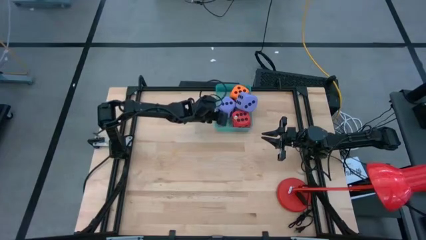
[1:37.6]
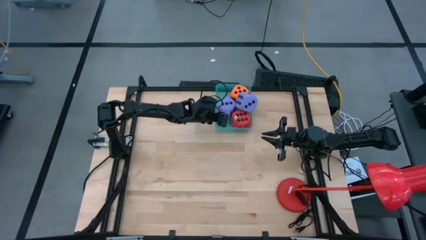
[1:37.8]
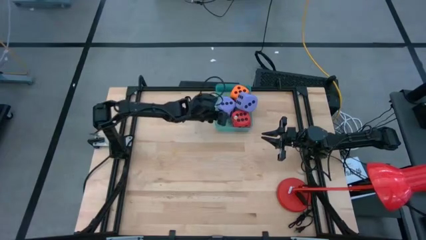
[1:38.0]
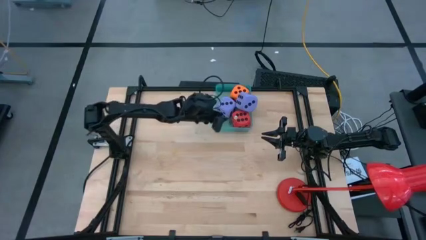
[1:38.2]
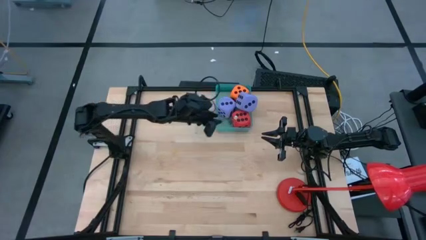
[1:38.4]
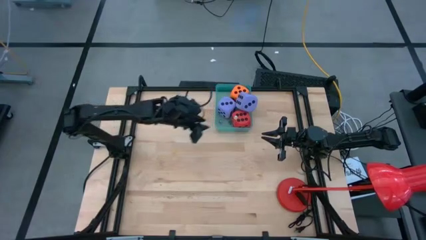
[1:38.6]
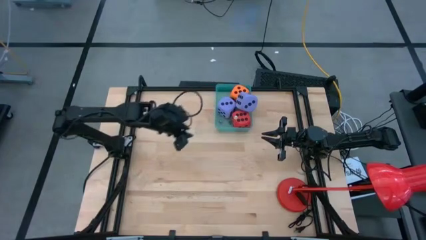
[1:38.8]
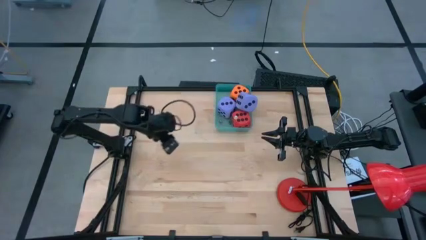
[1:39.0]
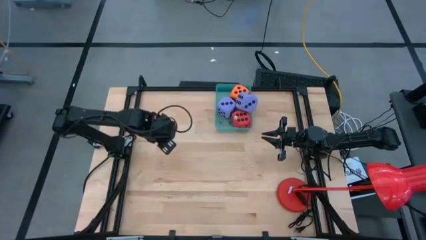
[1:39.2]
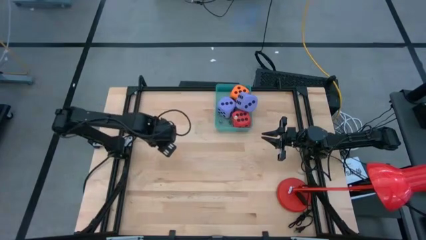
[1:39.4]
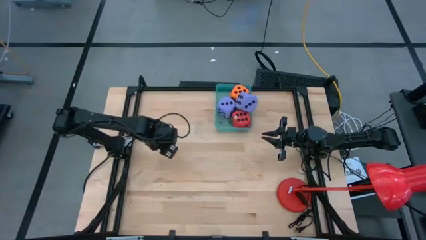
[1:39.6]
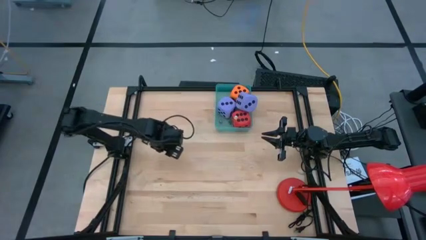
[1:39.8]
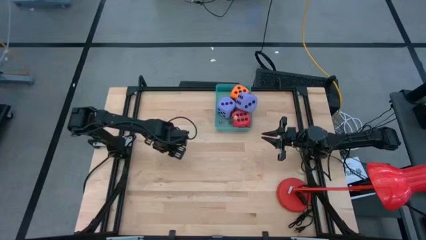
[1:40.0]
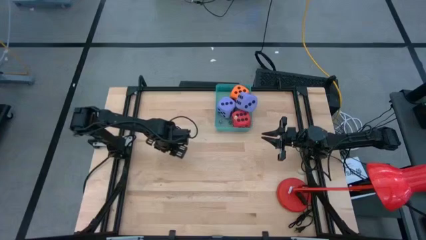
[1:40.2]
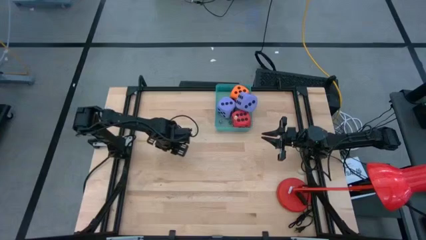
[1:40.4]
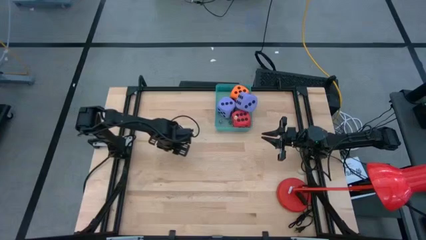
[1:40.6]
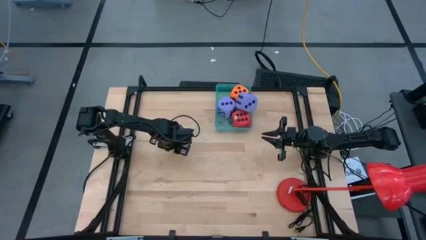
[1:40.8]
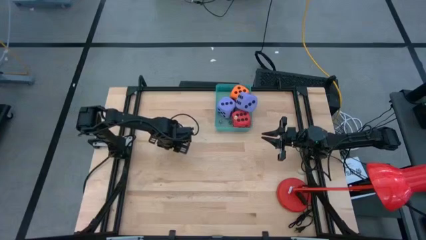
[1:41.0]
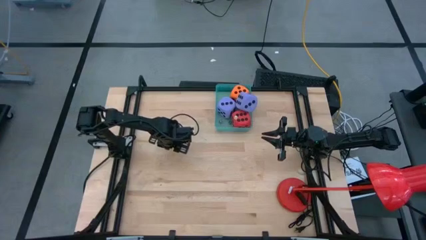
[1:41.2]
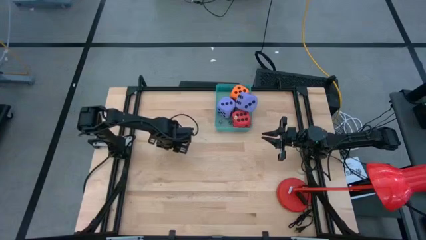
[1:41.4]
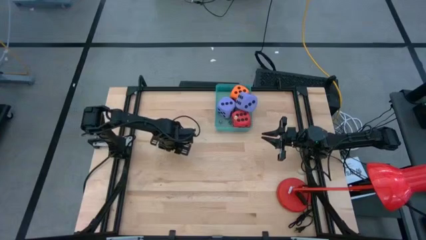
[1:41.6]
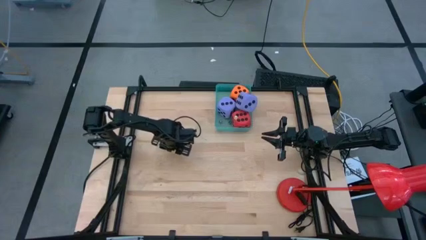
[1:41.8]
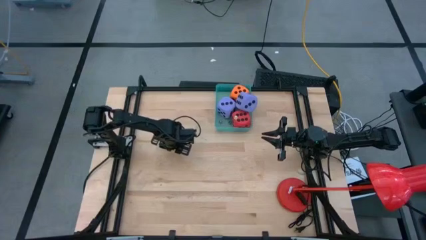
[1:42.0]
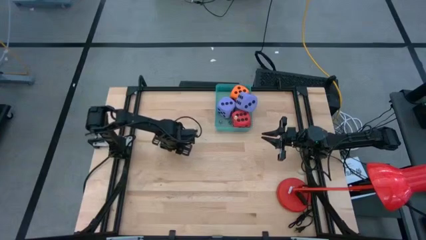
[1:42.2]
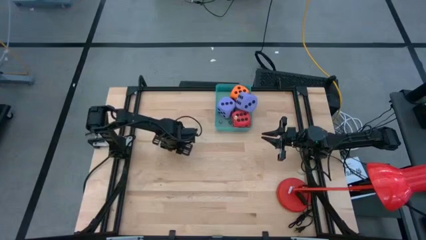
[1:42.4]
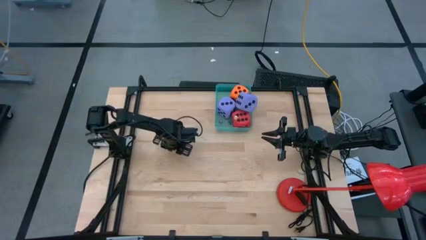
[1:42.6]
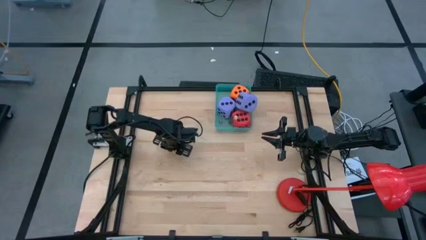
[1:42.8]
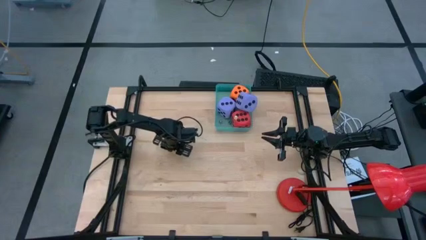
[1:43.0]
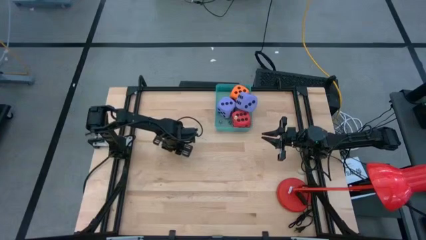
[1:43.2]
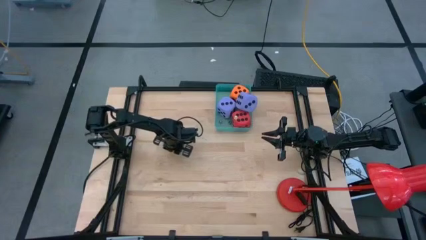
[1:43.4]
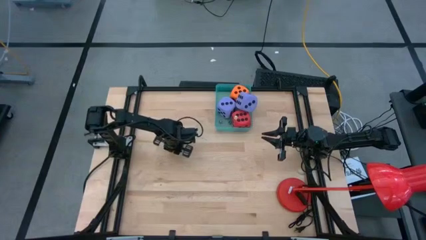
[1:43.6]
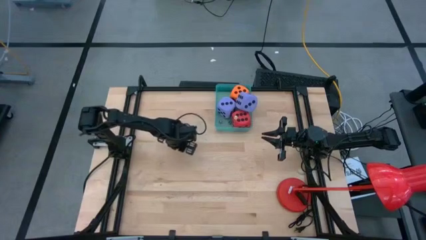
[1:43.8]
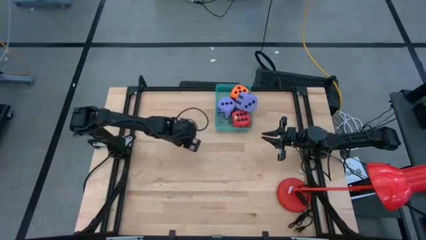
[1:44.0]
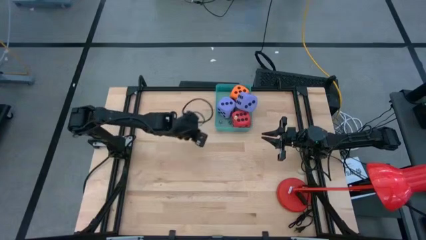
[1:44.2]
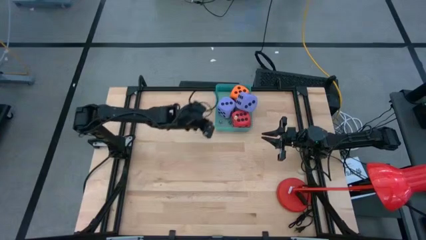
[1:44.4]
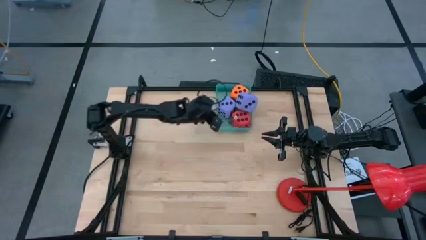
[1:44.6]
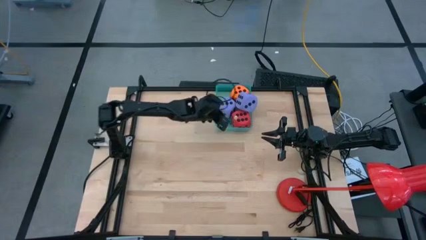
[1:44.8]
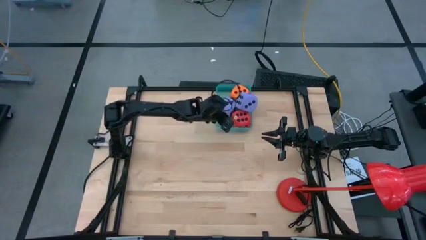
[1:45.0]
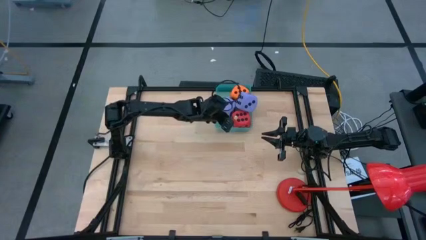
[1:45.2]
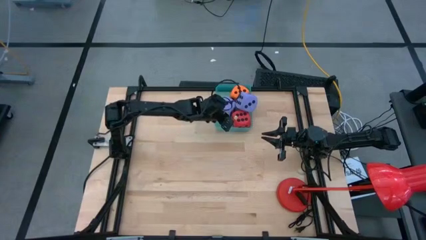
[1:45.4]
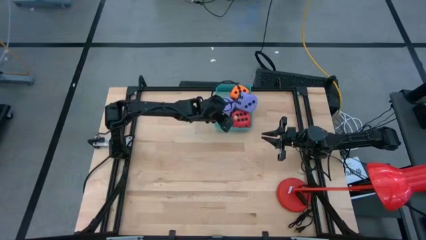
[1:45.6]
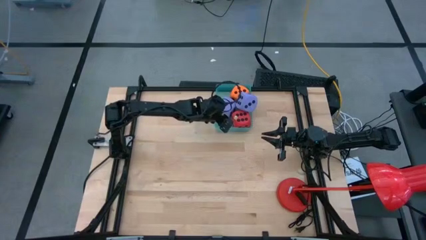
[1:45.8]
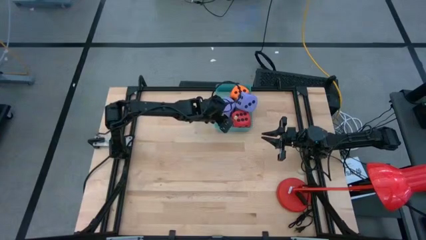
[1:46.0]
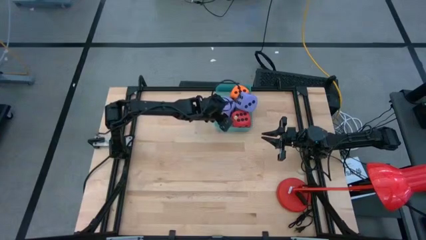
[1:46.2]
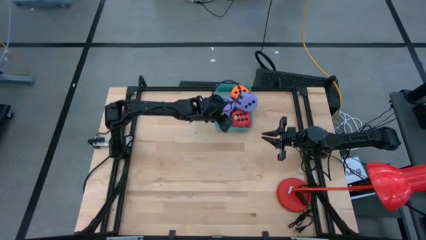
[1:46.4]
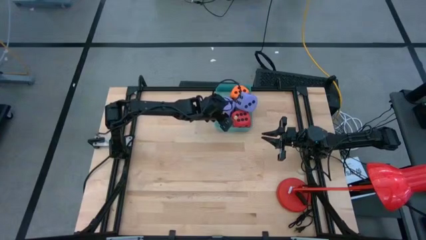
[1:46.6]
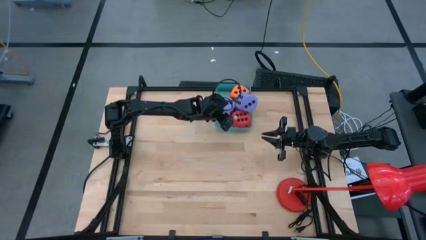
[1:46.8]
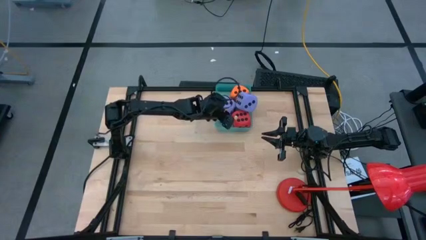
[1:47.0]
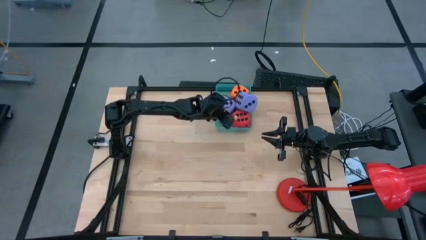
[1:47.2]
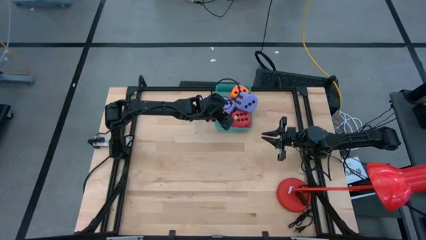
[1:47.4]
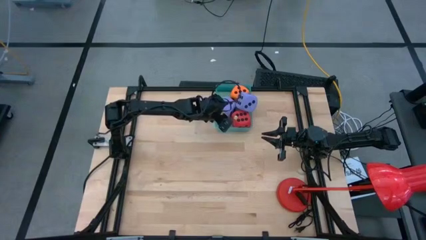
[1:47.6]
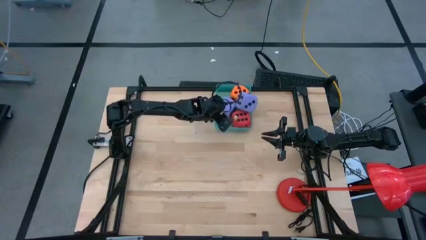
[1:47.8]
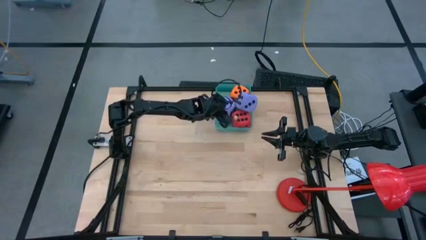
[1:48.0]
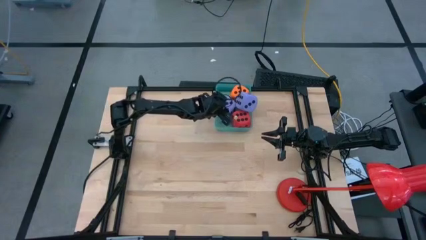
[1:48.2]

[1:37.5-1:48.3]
Task: Pick & Place Dice
Put the yellow die into the green bin

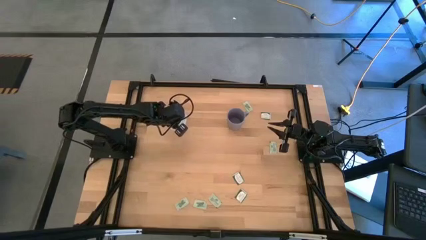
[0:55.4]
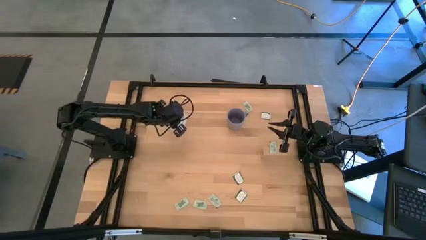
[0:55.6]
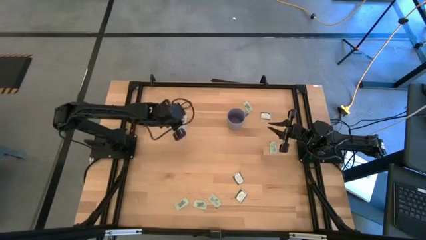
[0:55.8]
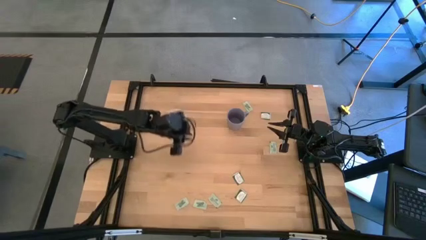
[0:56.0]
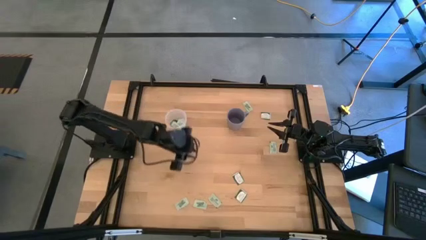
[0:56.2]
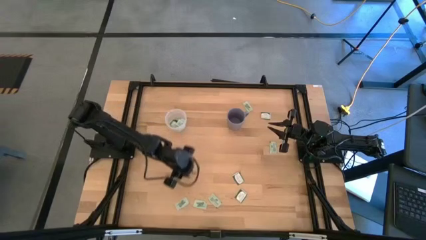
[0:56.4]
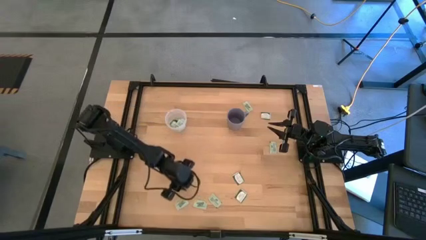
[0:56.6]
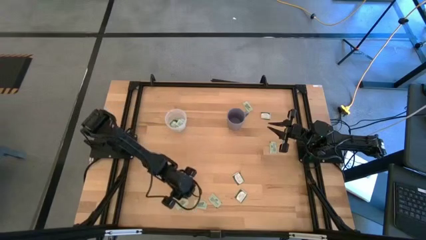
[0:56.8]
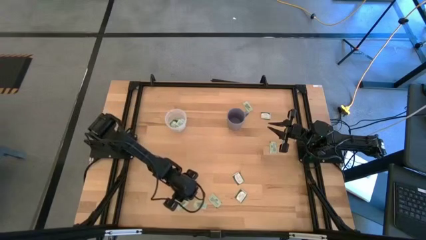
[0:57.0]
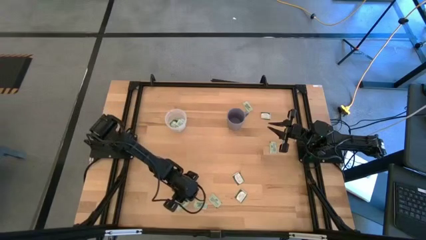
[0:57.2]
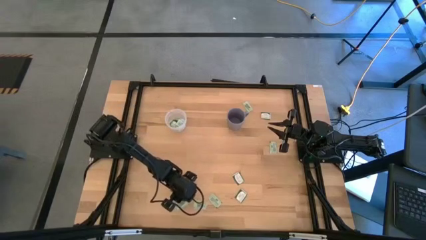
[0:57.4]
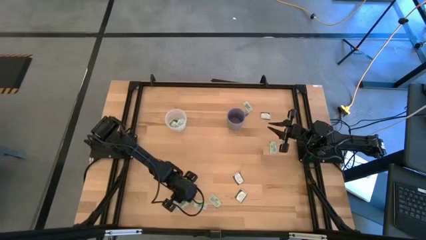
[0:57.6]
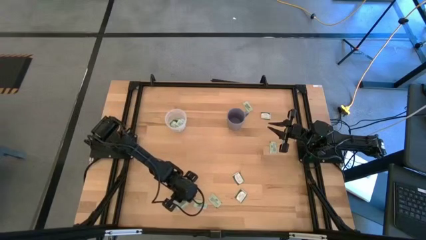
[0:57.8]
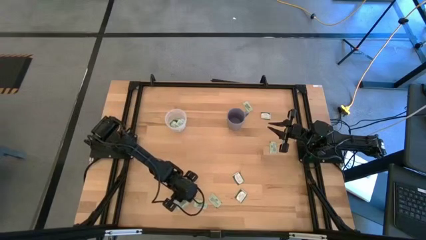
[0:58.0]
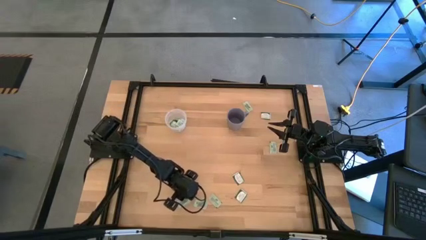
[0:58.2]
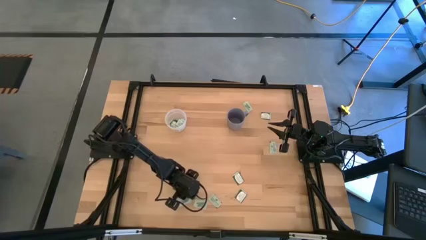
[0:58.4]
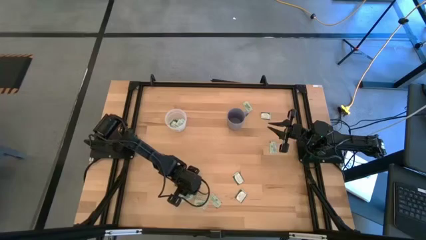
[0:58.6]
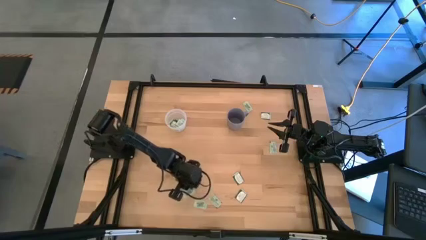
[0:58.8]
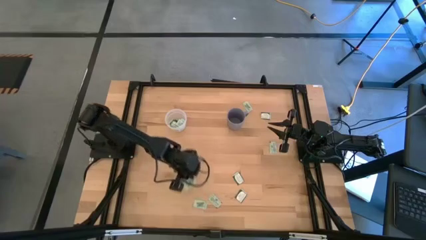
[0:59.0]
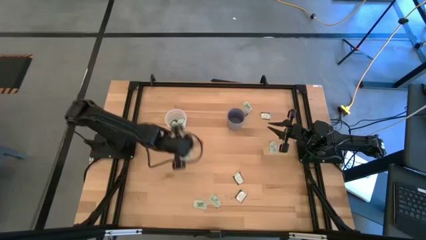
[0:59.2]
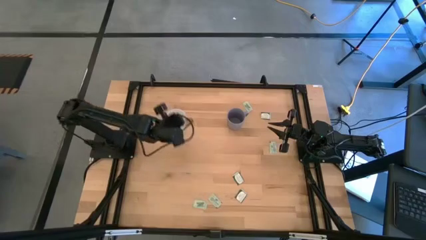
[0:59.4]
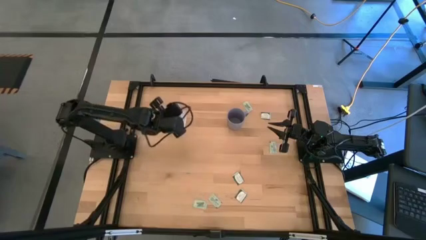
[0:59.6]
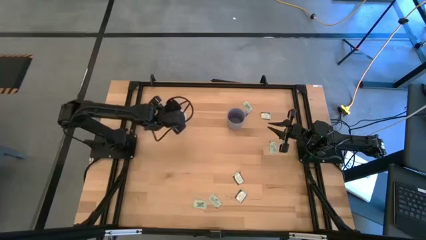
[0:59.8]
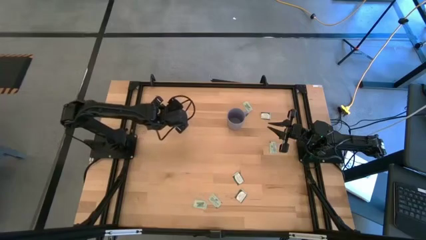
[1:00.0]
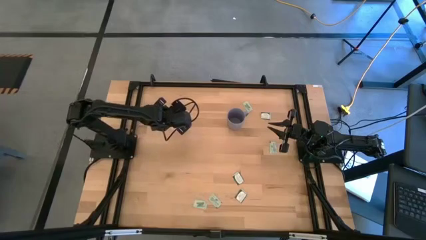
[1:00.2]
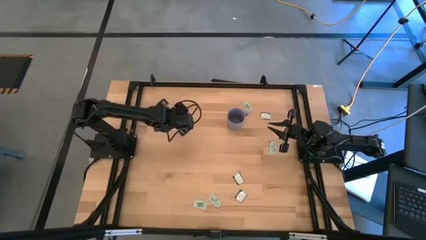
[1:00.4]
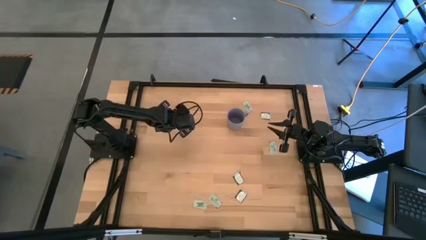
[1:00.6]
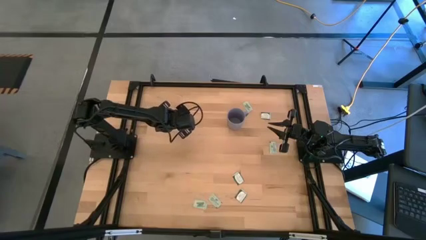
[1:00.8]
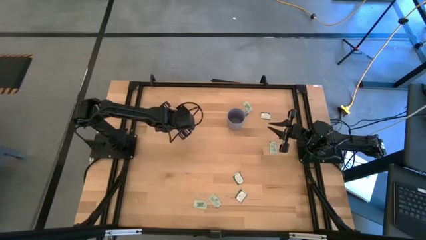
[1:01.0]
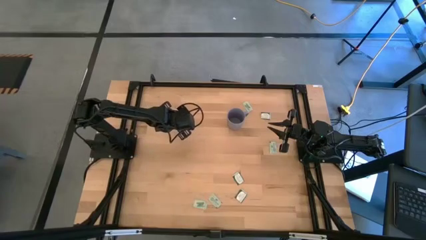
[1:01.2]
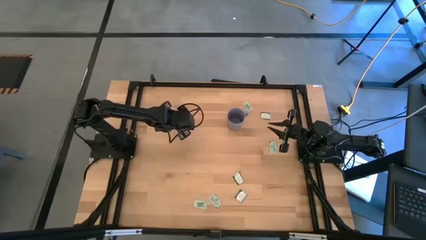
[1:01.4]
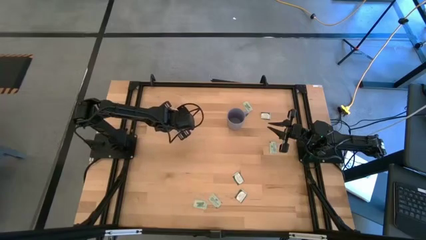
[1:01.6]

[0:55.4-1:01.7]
Task: Pick and place Stevia / Truvia into bins
Put the light green stevia packet into the transparent container
